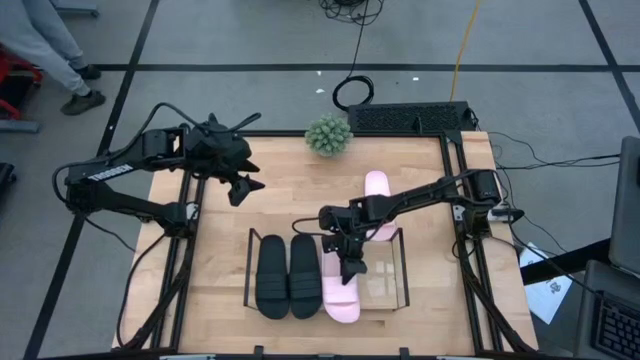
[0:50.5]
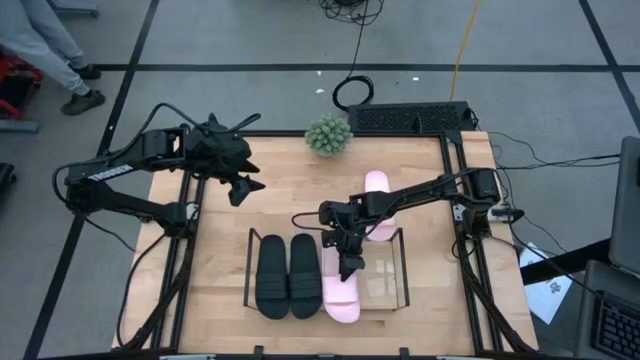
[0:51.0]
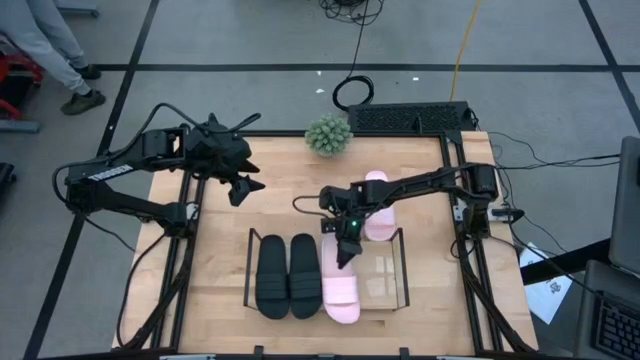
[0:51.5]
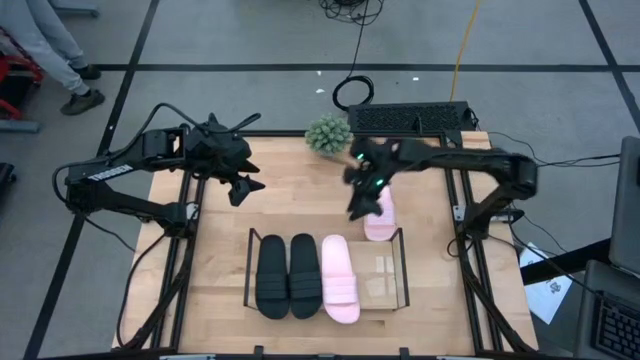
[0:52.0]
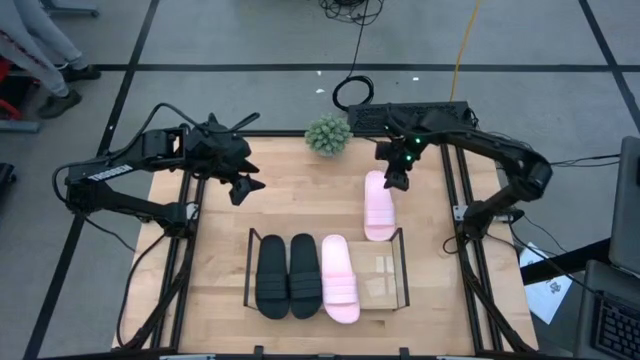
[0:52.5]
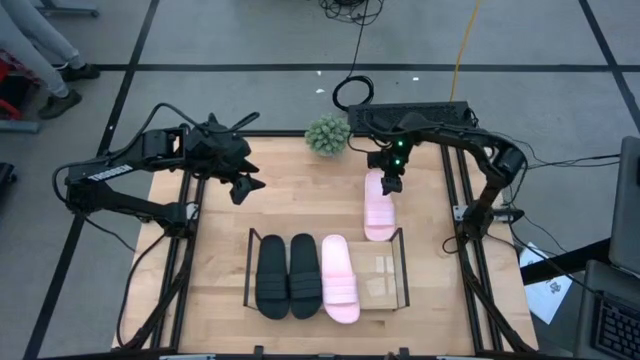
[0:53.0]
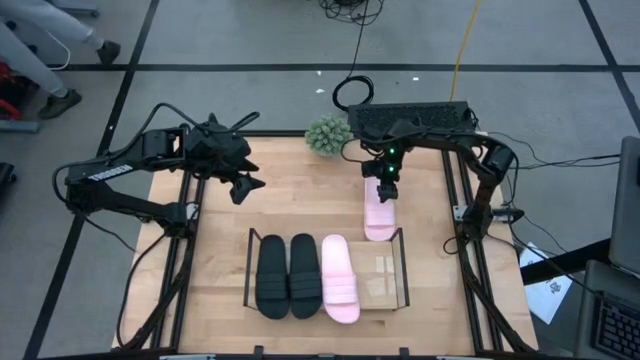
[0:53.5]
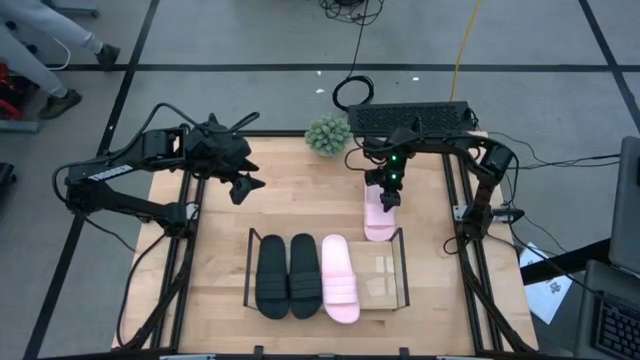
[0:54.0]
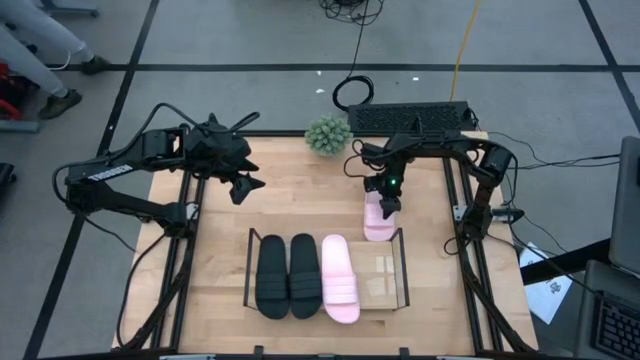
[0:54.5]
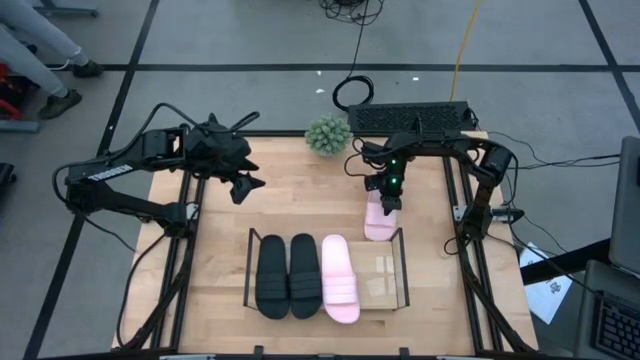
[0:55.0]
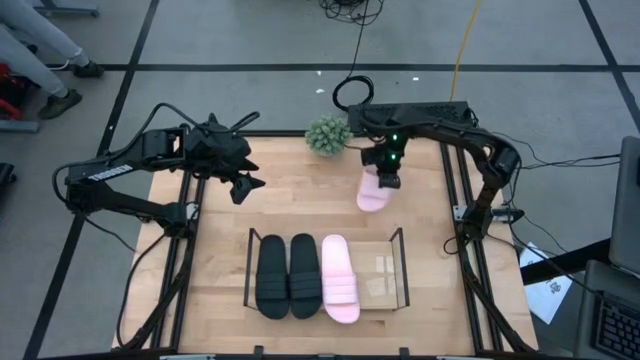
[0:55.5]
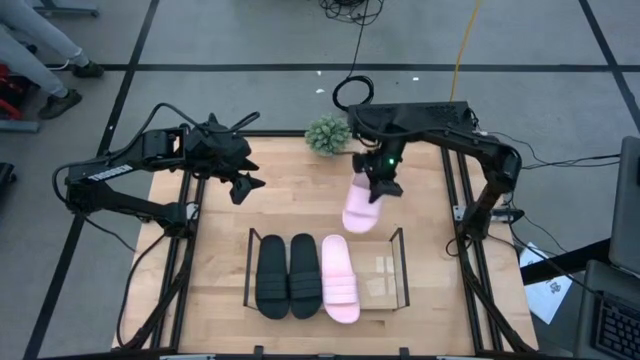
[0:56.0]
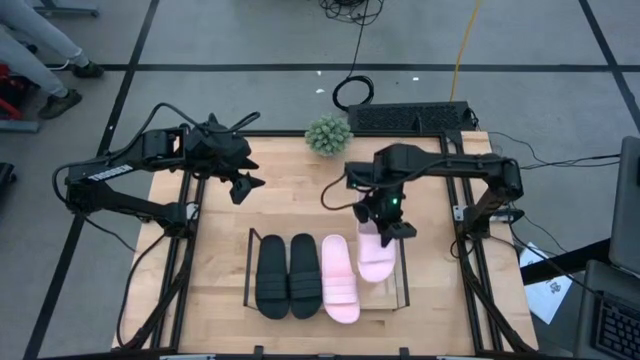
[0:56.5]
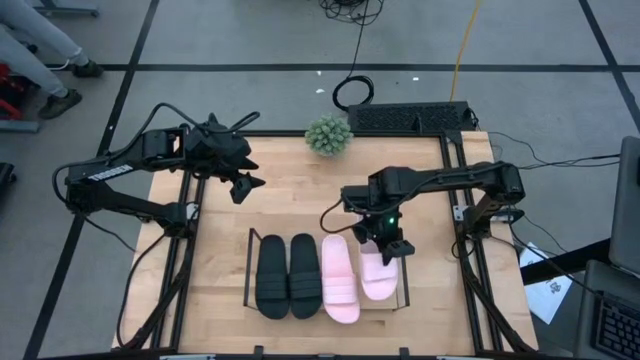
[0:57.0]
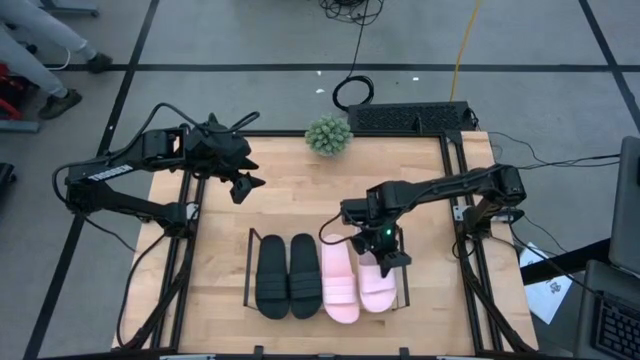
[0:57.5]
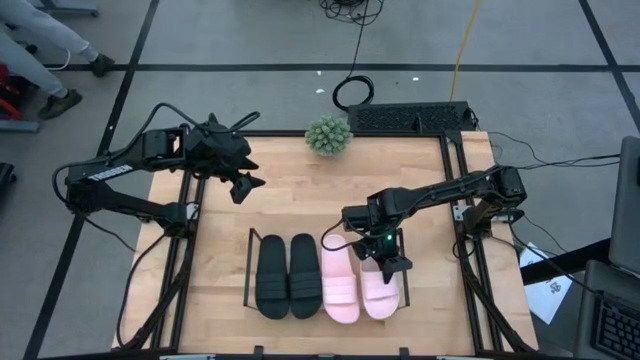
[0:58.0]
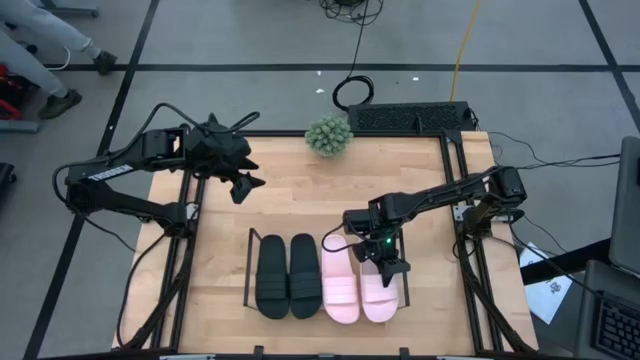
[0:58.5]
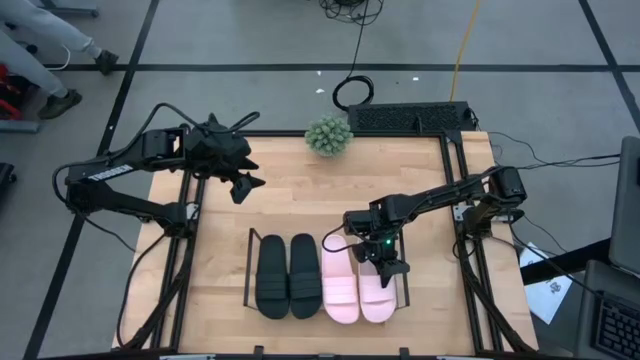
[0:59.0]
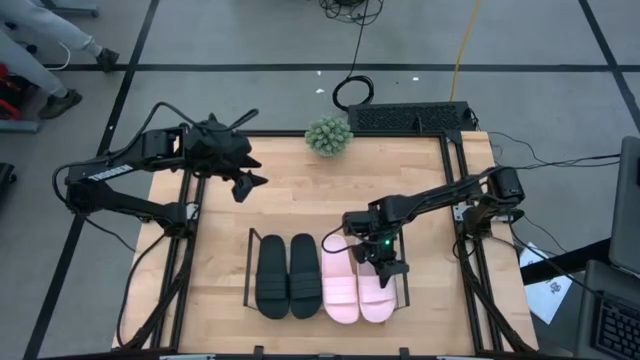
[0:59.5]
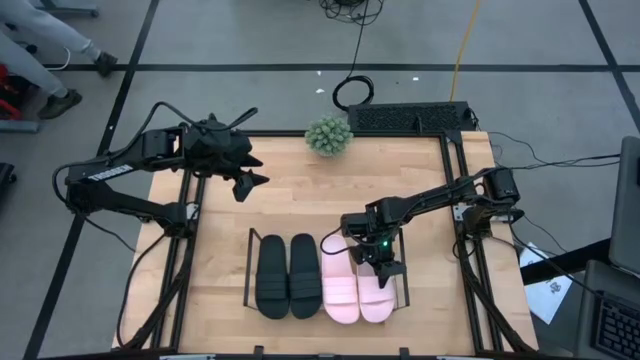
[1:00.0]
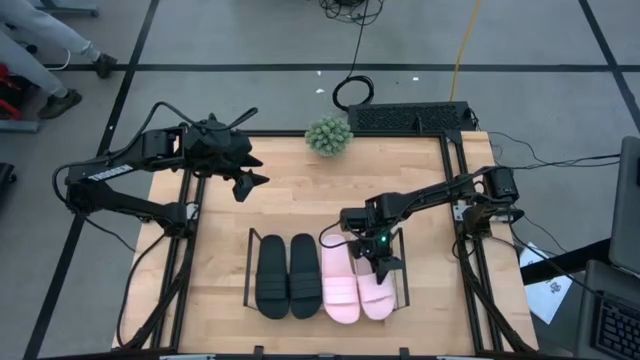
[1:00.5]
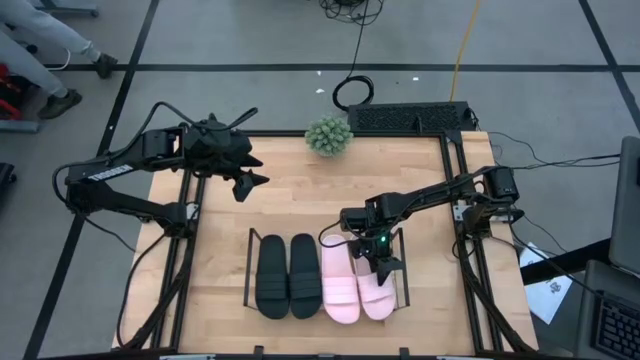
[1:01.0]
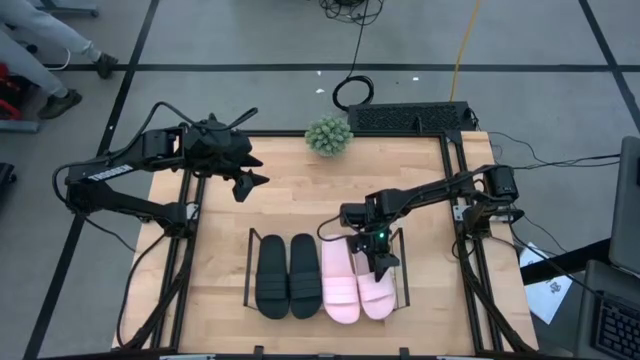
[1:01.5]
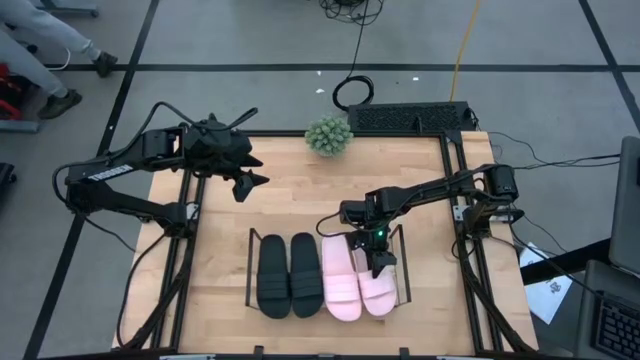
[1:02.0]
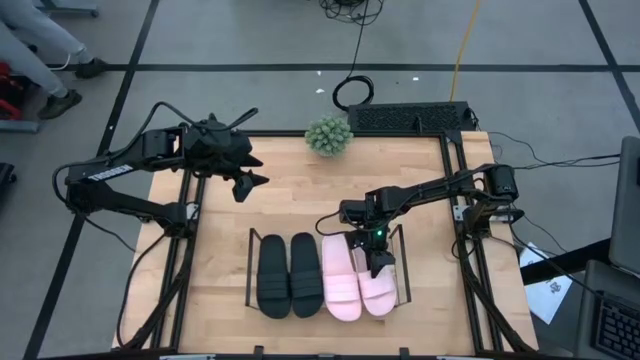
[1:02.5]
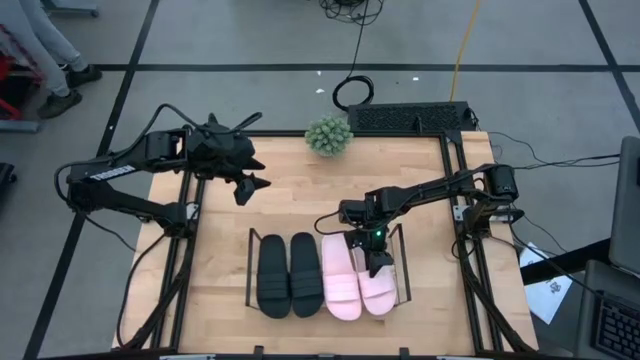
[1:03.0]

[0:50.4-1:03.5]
Task: Pick and place slides into the shelf
Put the pink slipper on the shelf

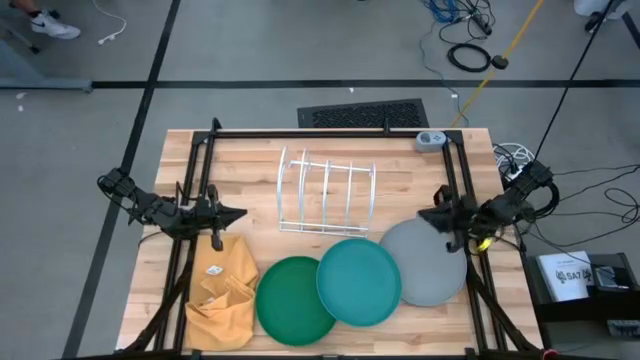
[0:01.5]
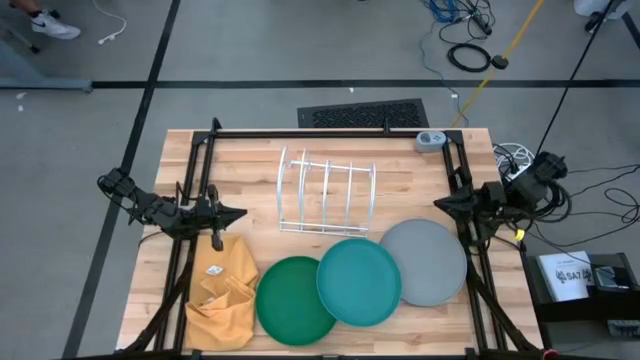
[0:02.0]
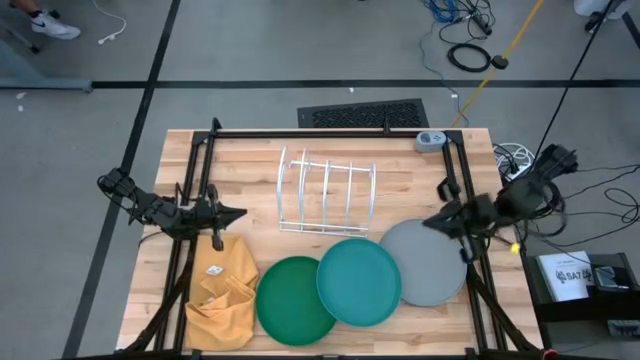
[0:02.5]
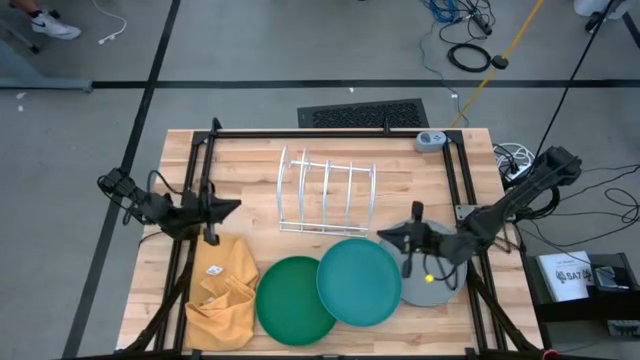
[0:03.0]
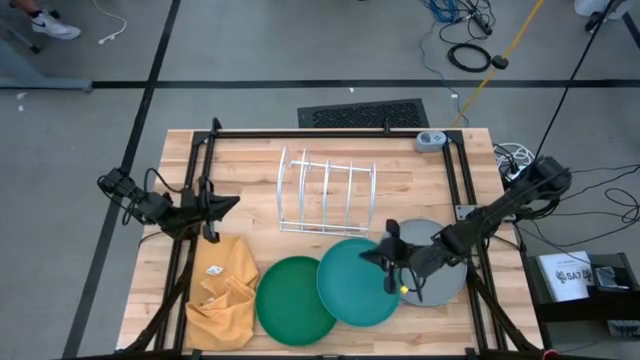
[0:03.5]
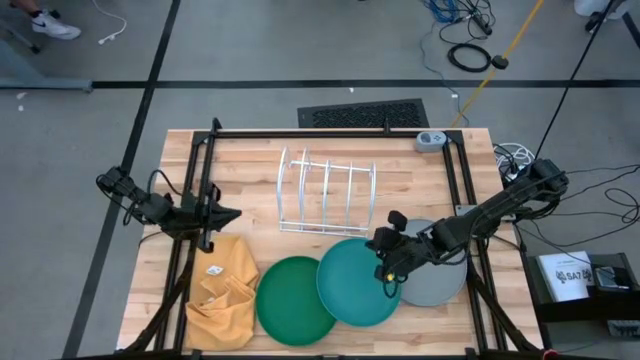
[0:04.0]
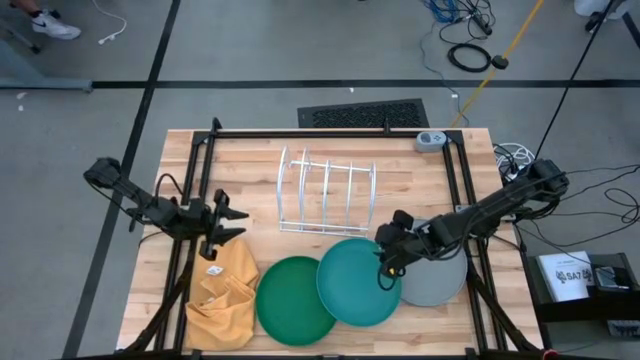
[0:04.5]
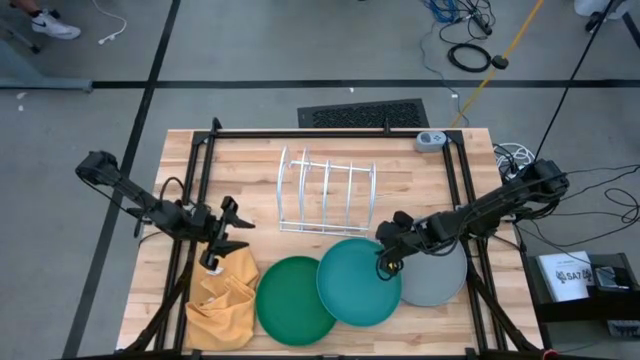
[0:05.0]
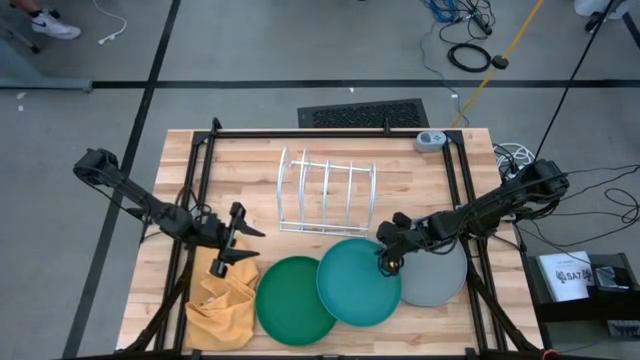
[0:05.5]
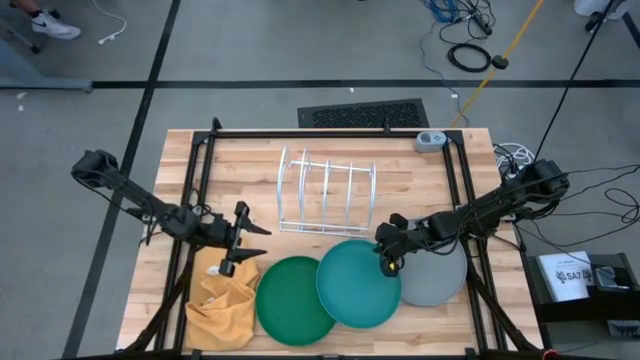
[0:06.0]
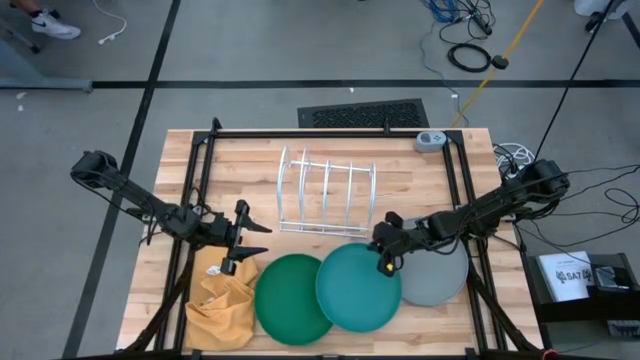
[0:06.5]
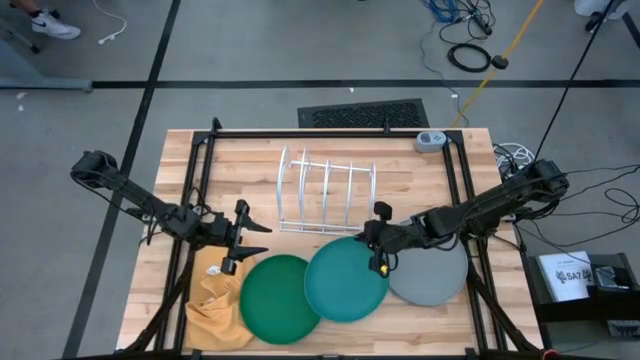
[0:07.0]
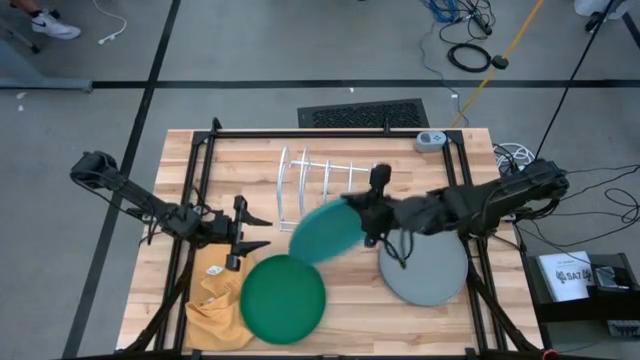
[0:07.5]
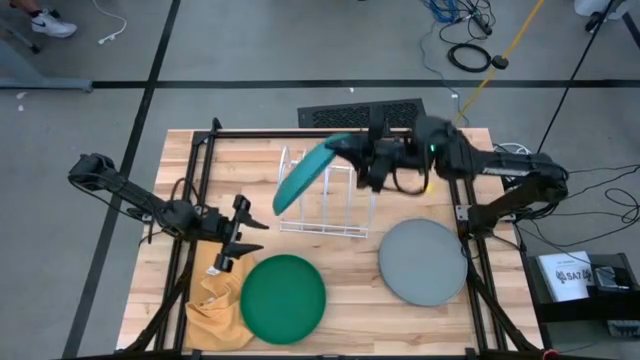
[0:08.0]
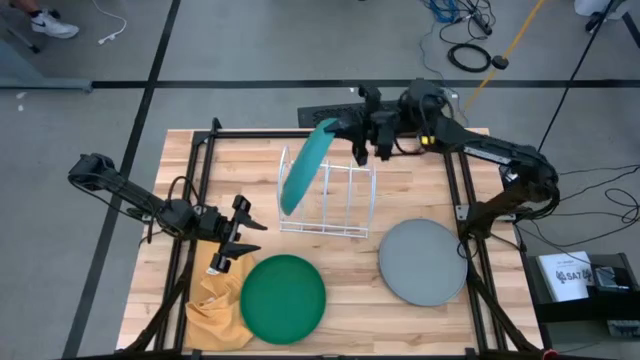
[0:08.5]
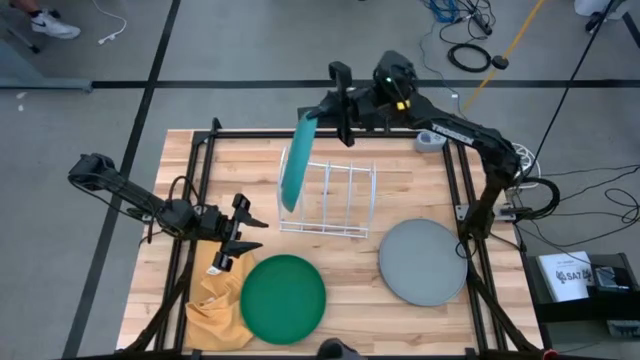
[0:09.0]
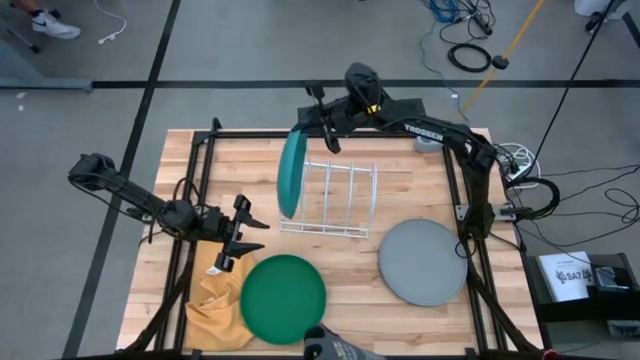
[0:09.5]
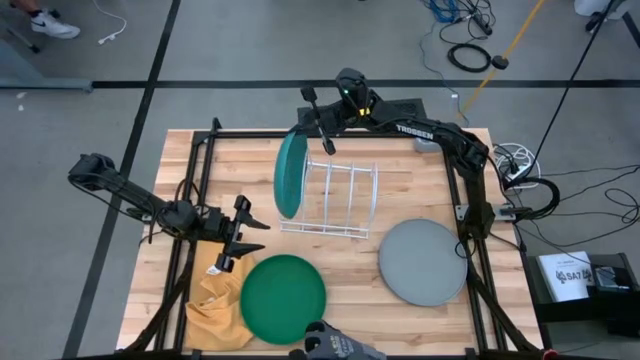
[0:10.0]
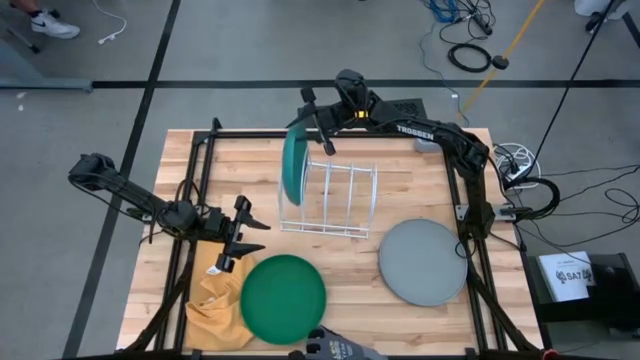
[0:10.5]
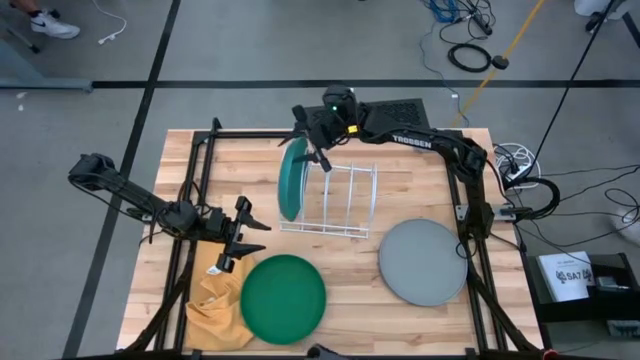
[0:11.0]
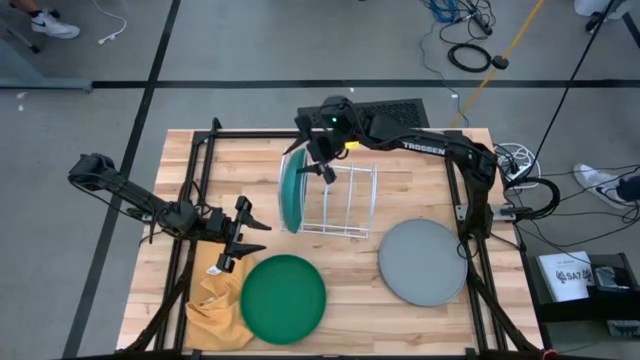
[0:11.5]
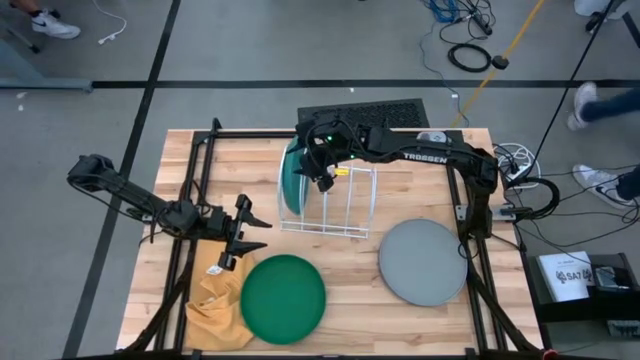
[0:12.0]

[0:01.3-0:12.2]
Task: Sort dishes
Put the light blue plate in the white dish rack
